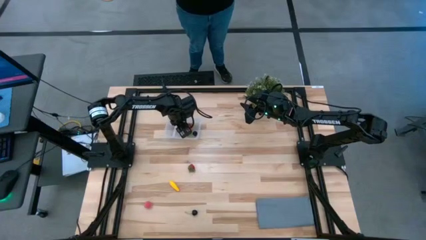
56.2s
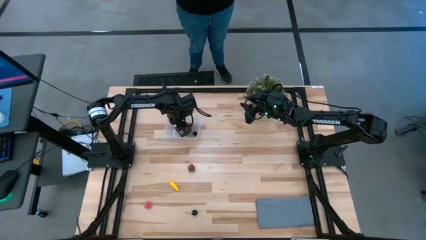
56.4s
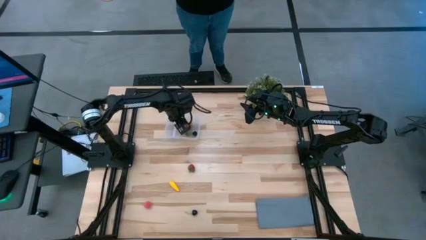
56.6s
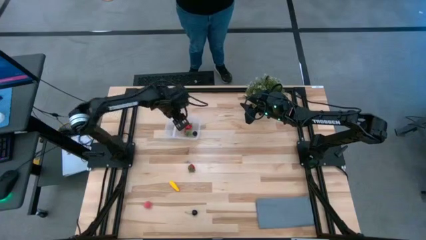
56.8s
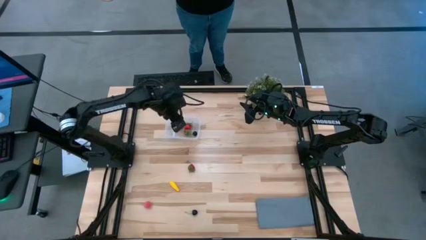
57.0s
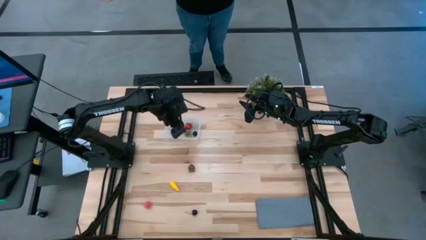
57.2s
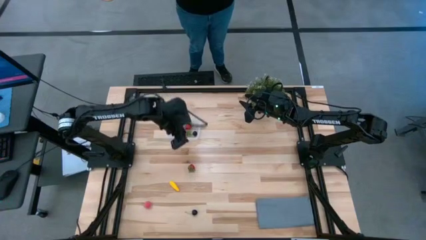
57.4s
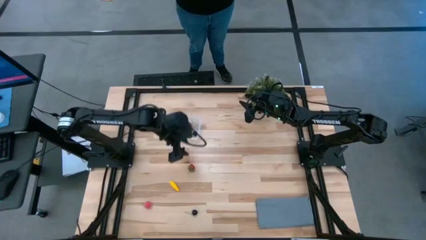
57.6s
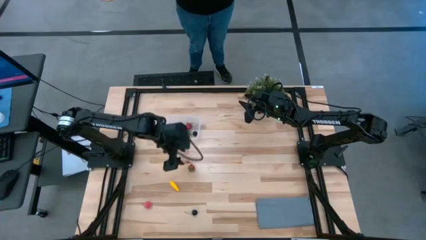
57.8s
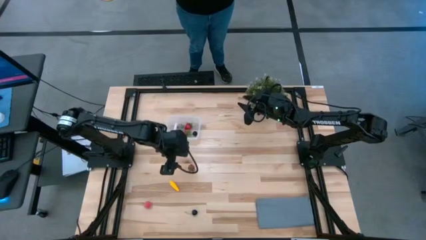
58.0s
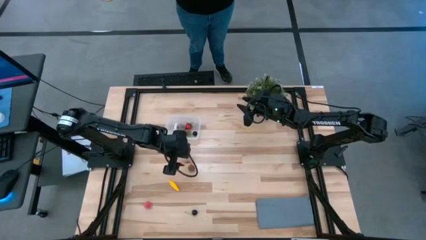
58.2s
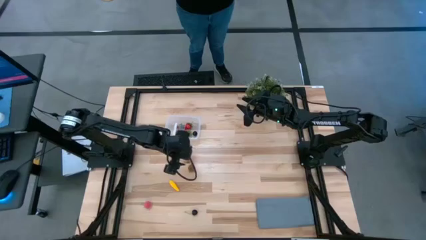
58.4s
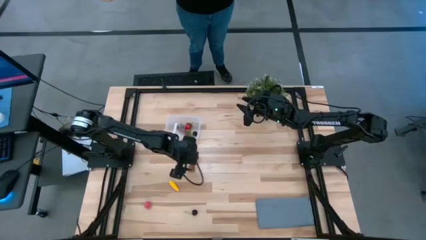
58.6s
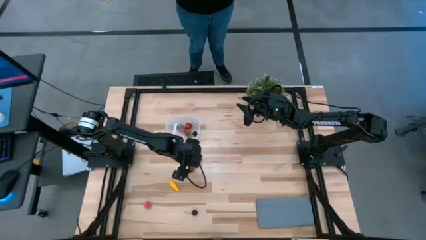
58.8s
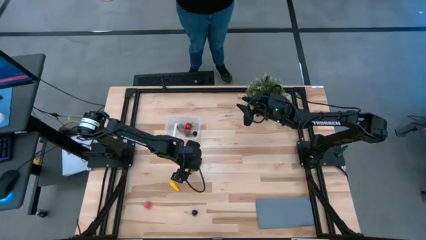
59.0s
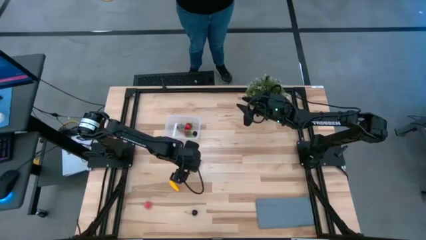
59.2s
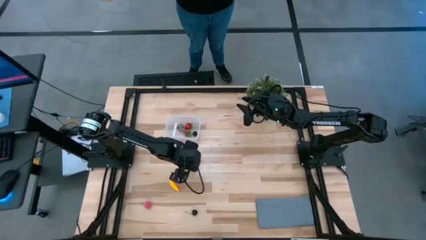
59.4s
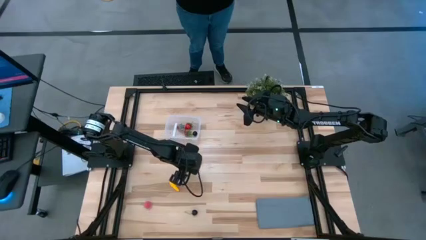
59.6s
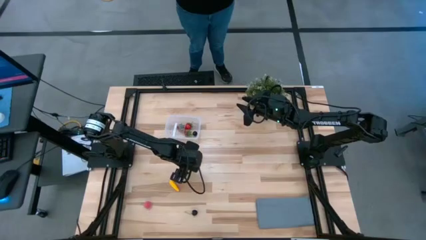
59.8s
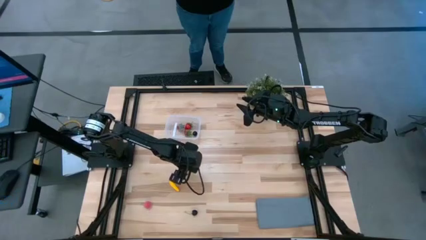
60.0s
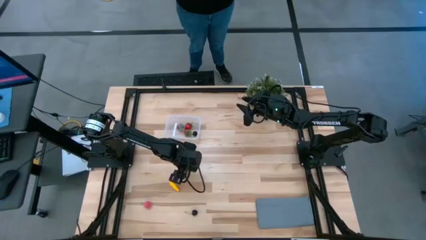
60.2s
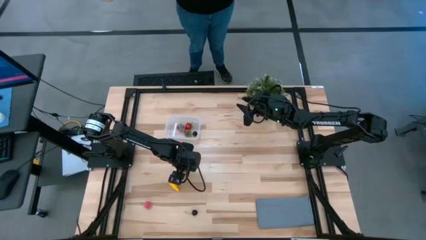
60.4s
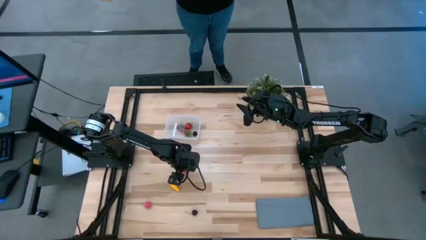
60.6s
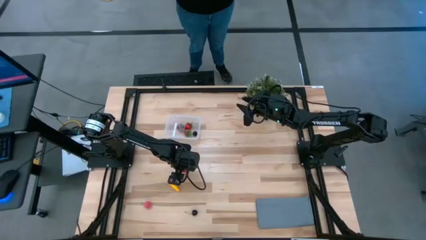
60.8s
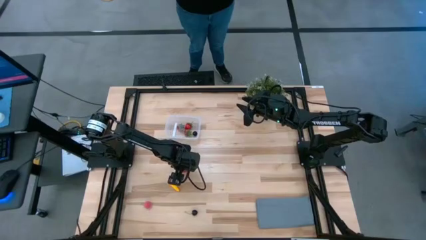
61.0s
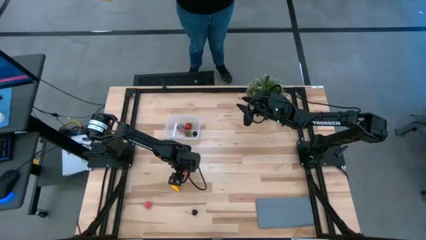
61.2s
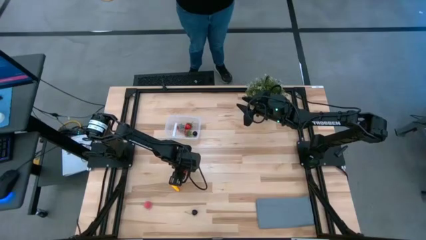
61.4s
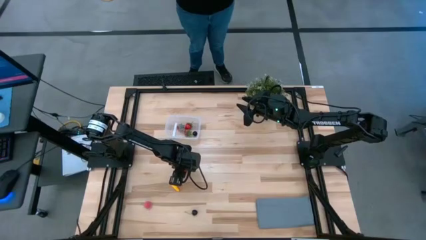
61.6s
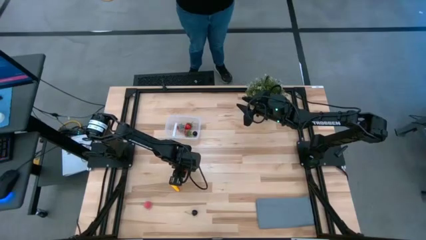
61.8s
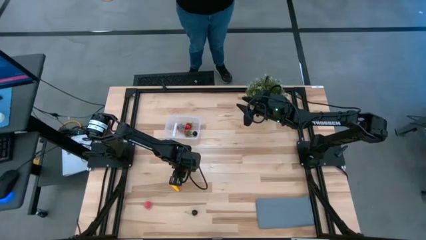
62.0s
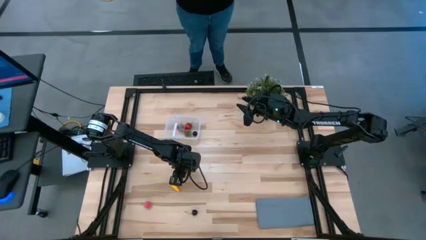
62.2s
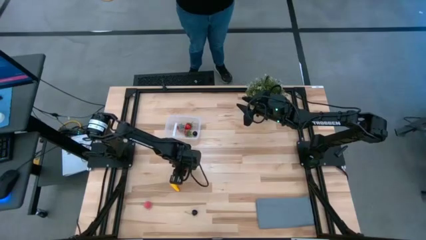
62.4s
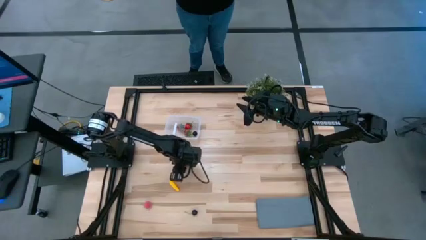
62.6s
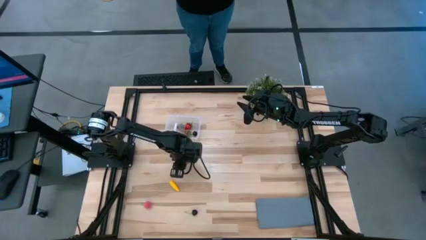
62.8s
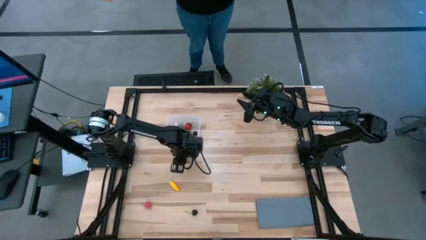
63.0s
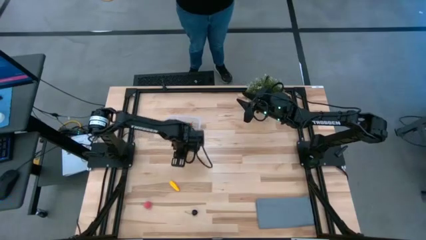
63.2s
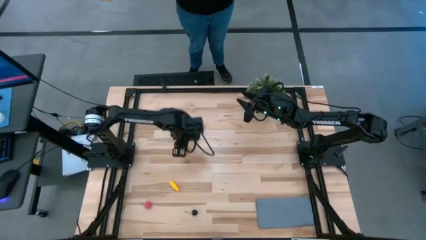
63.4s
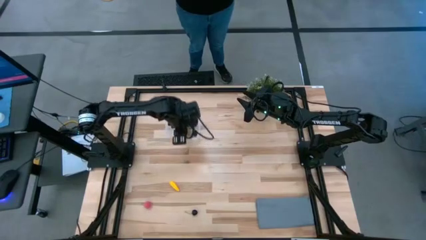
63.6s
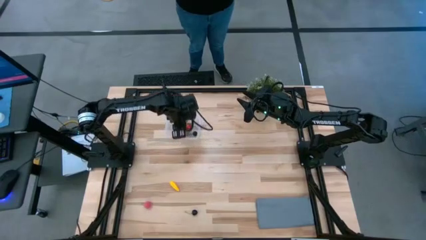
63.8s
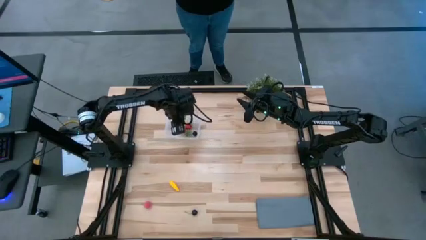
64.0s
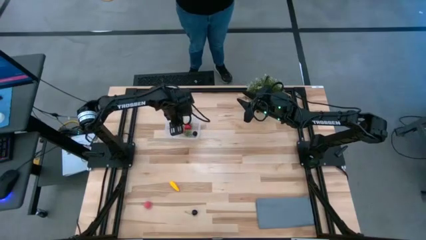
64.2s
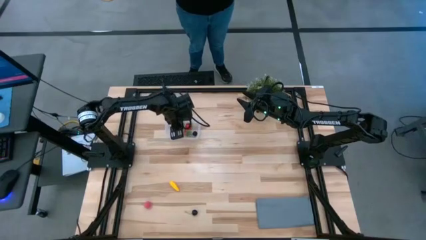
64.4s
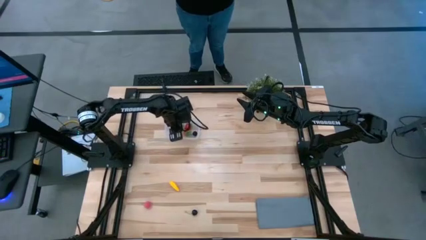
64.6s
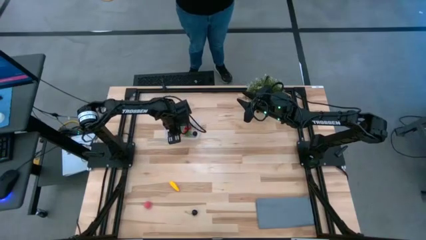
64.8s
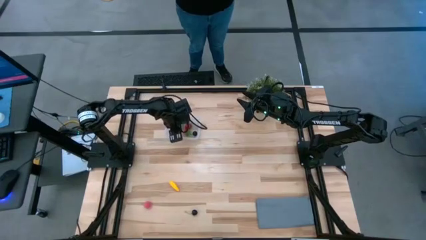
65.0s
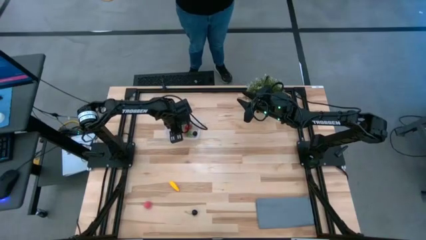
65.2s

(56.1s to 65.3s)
Task: Pick and placing Produce into tupperware
Put the strawberry into the transparent bin

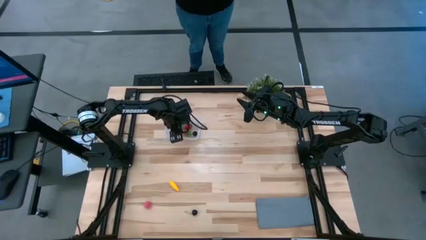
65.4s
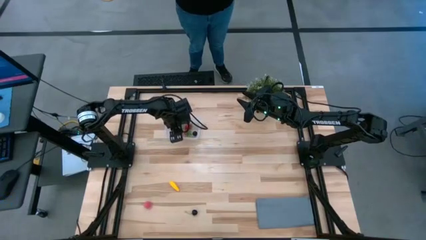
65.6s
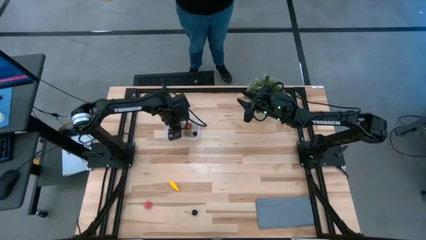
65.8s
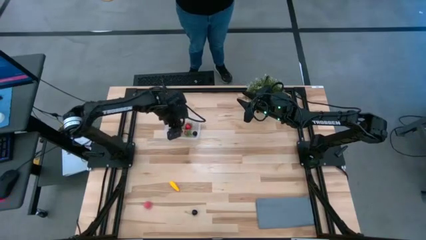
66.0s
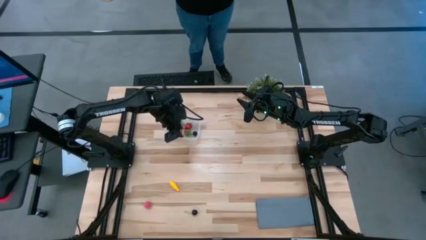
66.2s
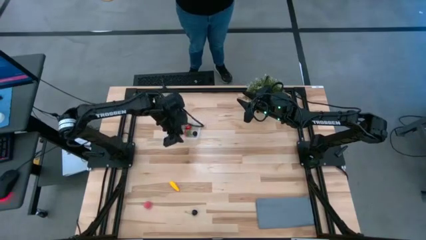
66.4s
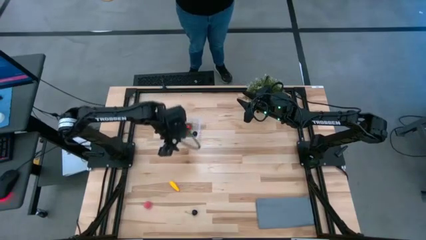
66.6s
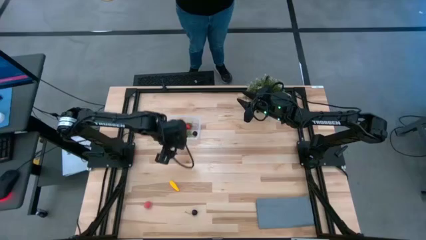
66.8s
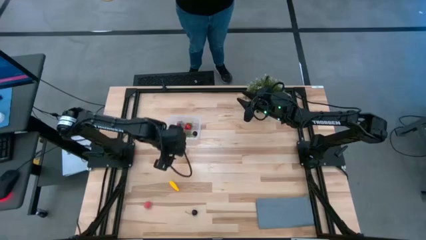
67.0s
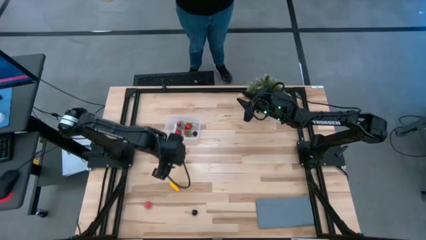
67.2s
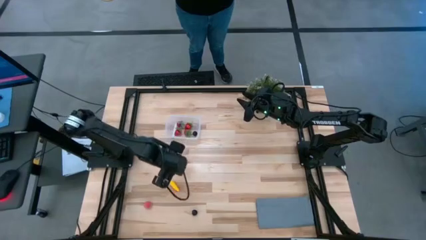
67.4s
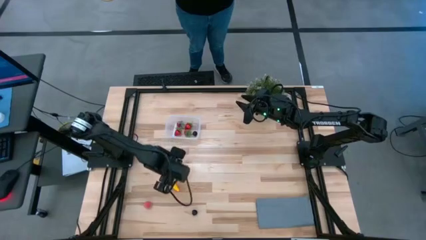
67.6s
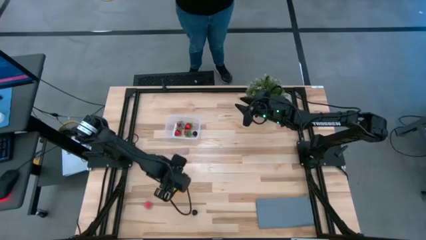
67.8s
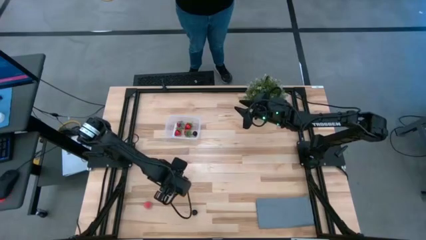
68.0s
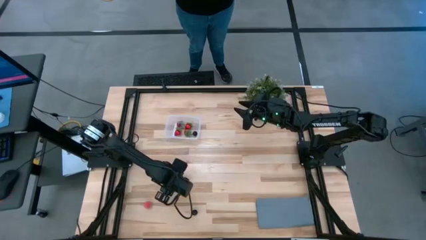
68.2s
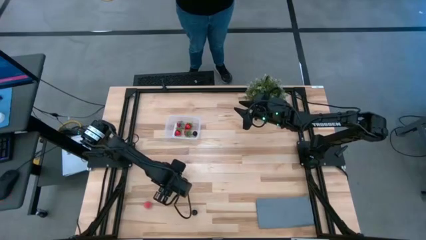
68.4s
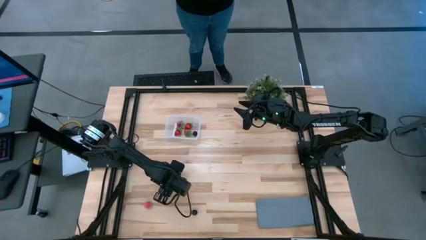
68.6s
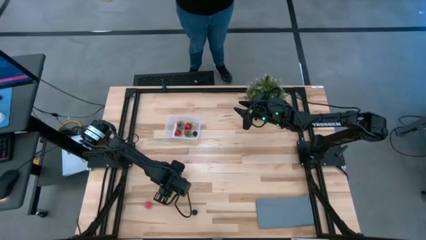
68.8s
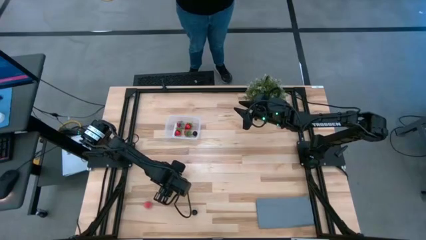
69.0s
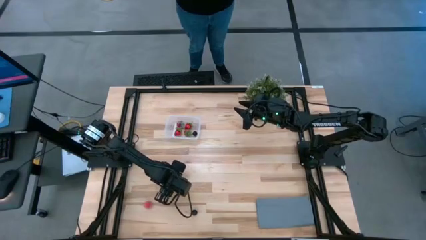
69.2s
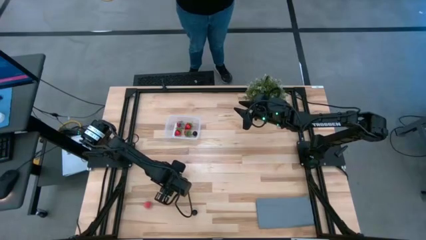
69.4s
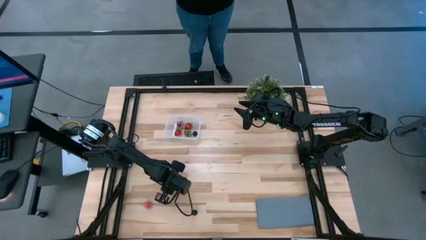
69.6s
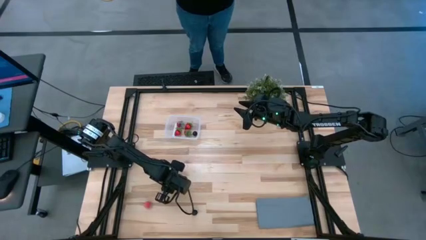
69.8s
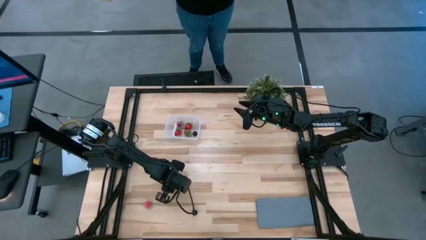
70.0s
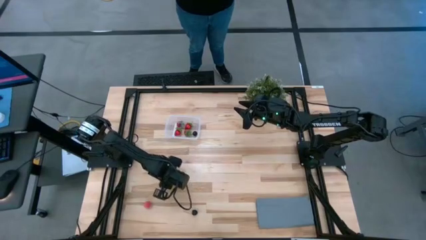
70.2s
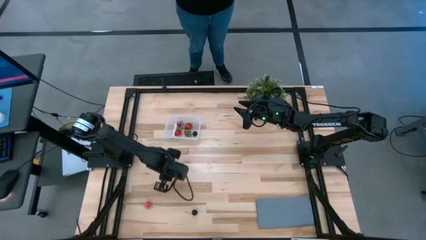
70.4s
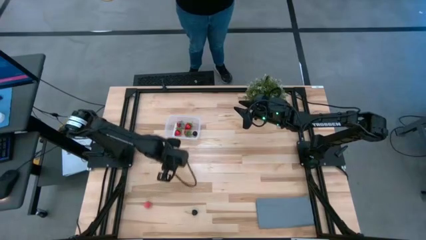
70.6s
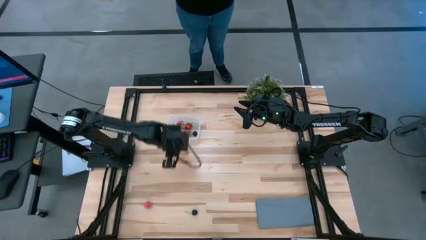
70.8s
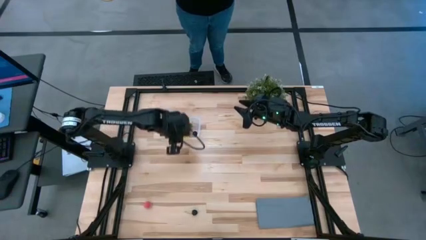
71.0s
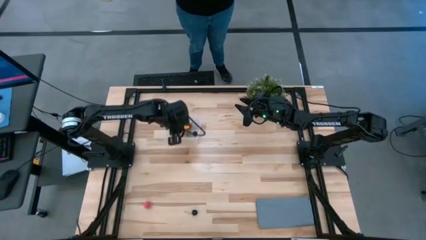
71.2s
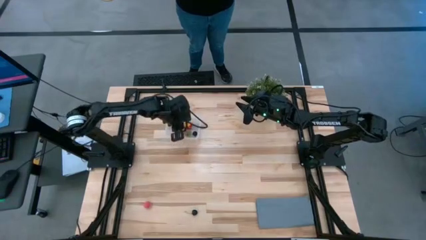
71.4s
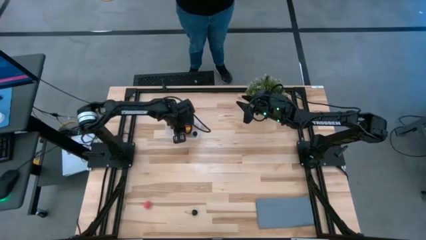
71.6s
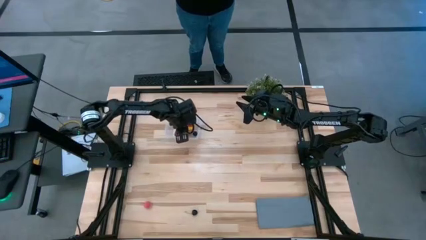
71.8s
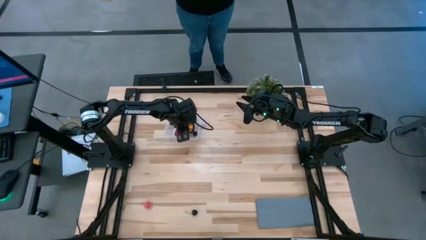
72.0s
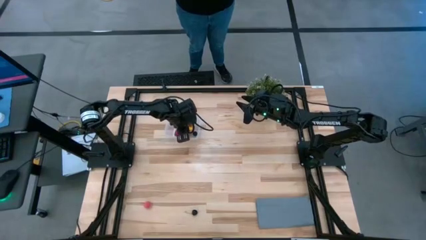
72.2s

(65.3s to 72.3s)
Put the corn into the transparent bin
